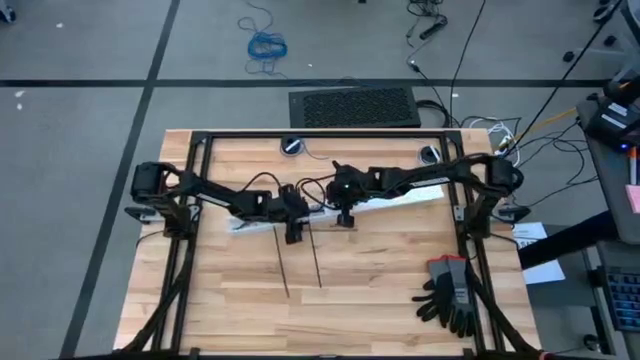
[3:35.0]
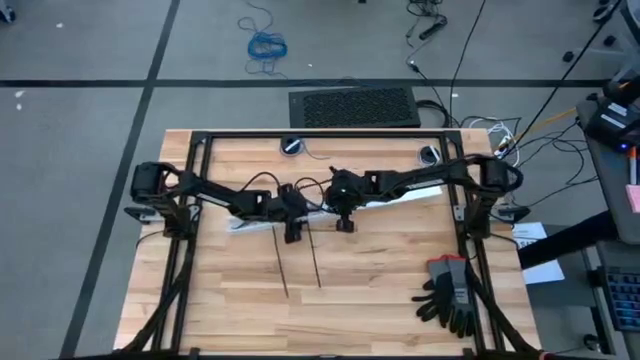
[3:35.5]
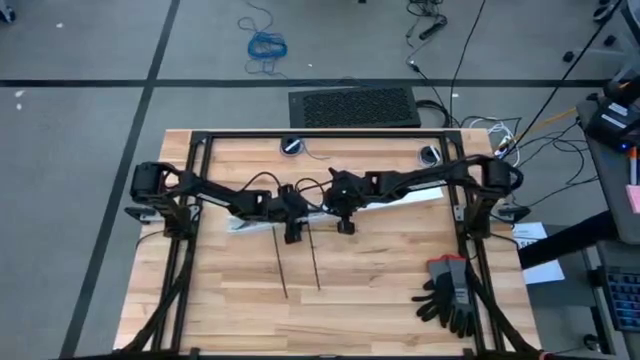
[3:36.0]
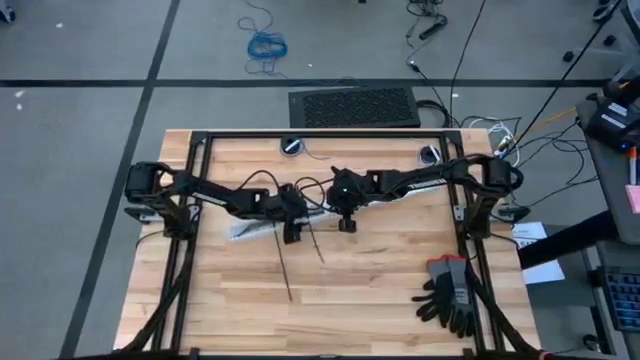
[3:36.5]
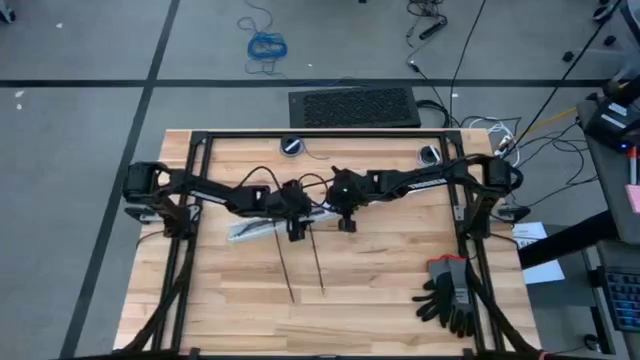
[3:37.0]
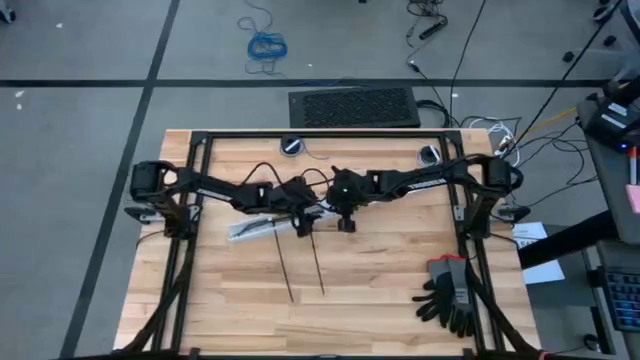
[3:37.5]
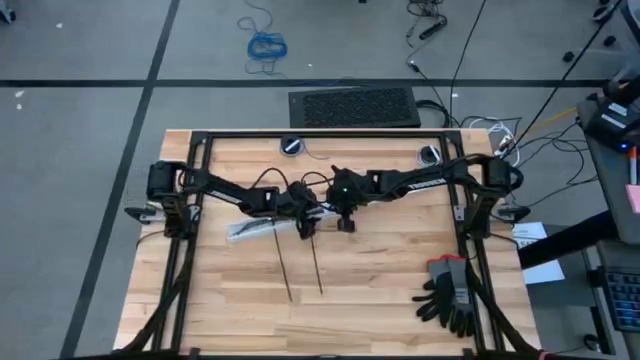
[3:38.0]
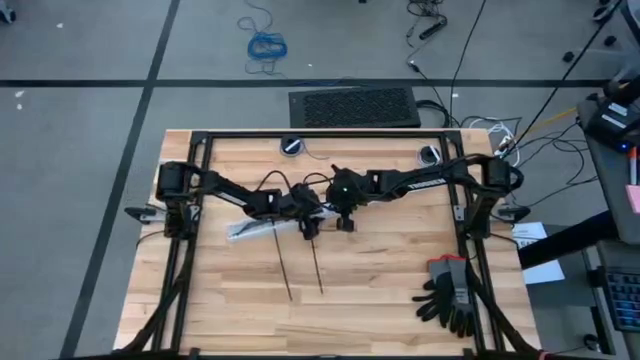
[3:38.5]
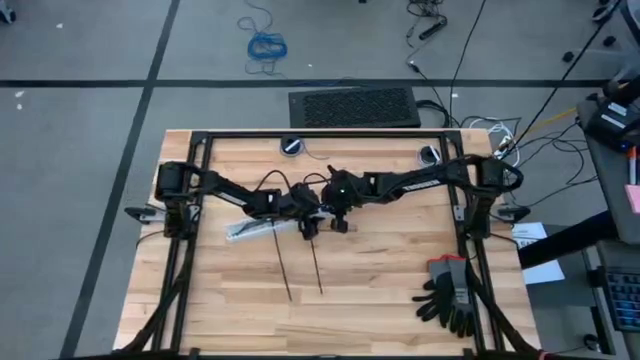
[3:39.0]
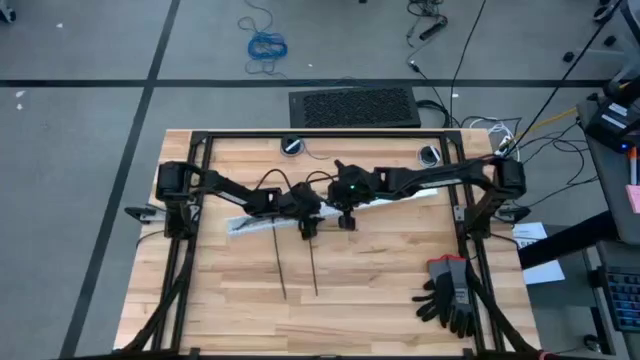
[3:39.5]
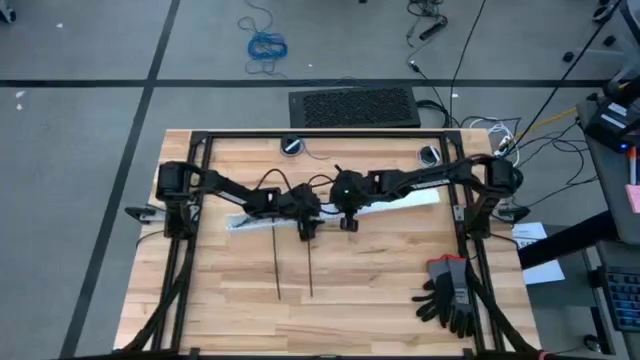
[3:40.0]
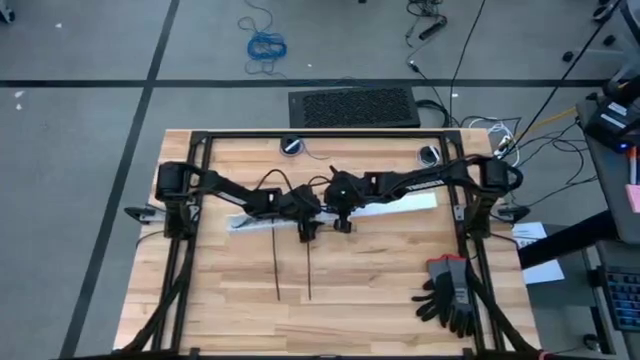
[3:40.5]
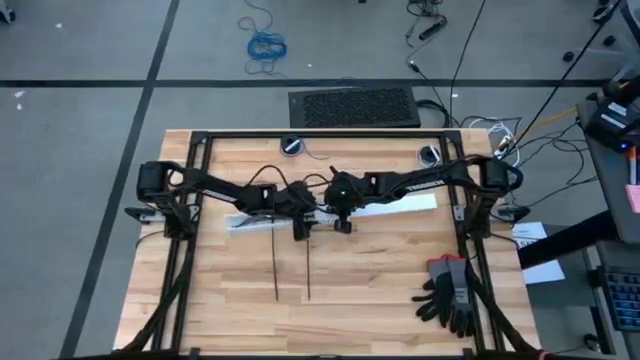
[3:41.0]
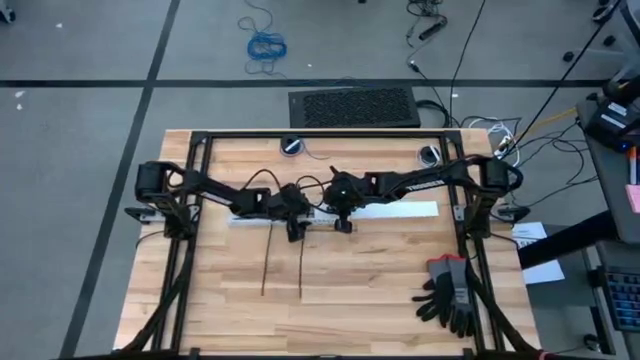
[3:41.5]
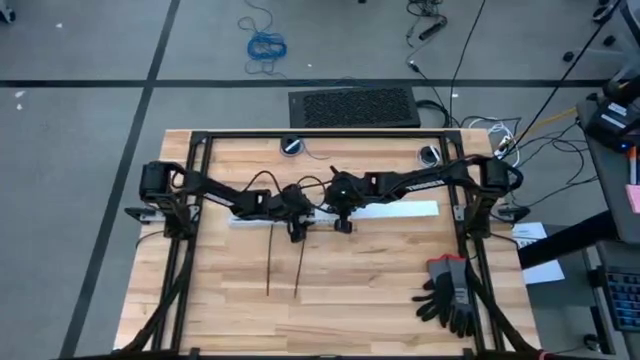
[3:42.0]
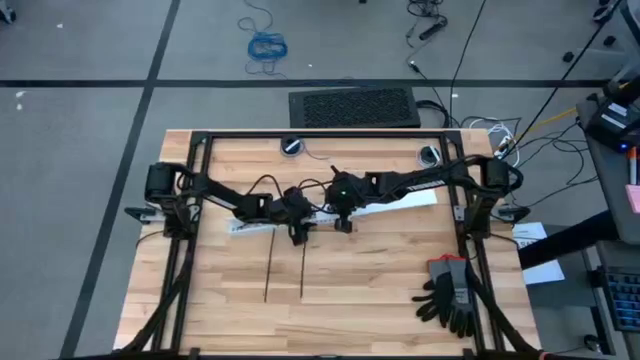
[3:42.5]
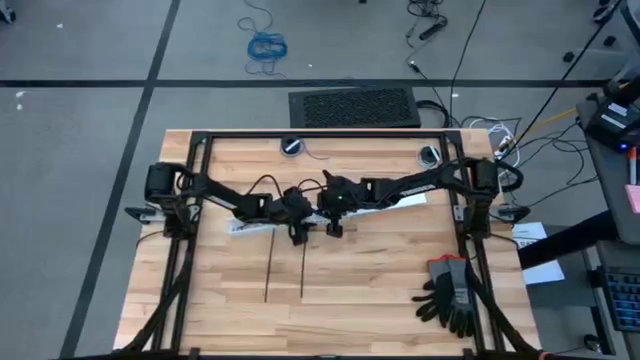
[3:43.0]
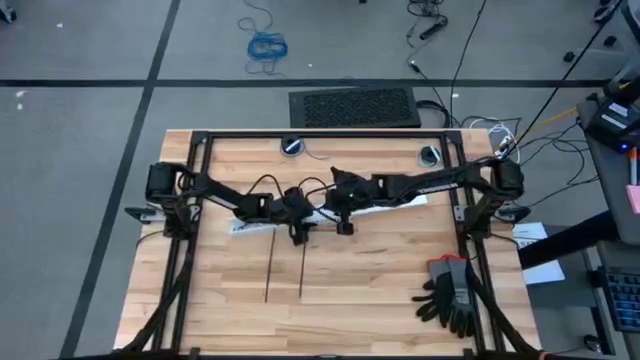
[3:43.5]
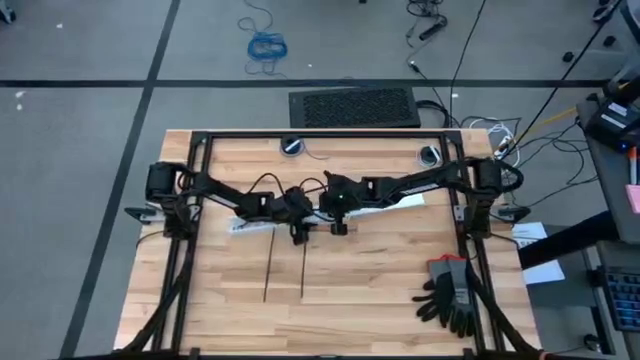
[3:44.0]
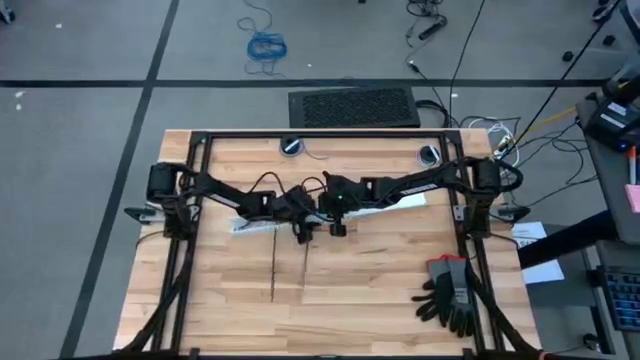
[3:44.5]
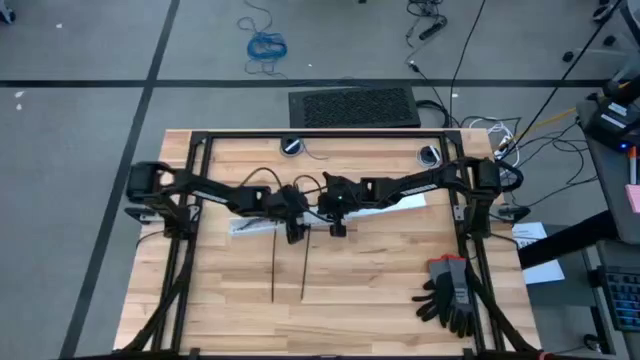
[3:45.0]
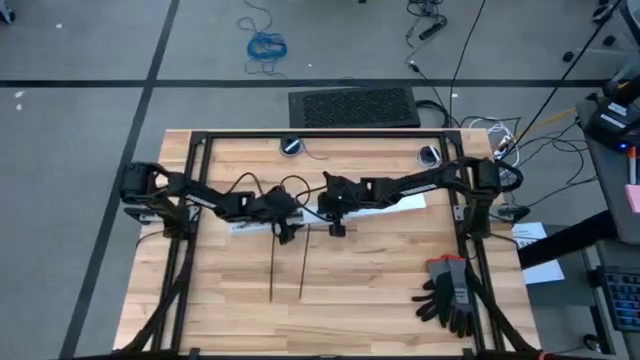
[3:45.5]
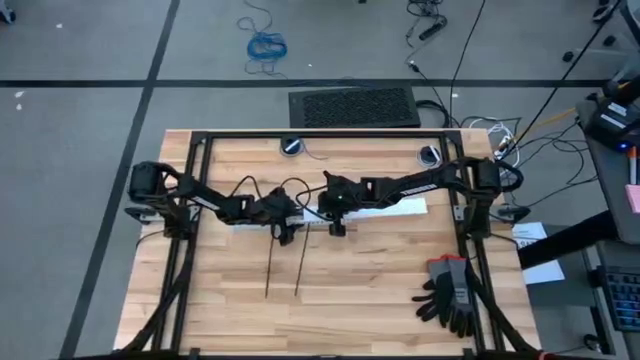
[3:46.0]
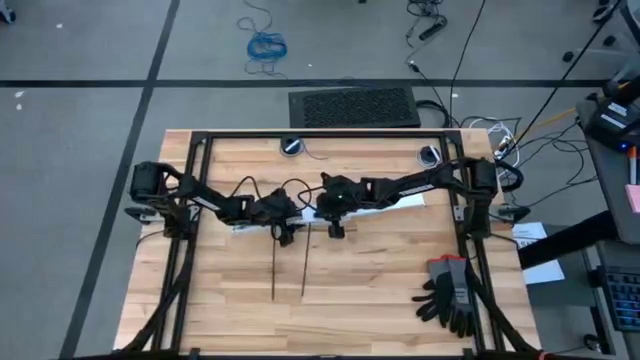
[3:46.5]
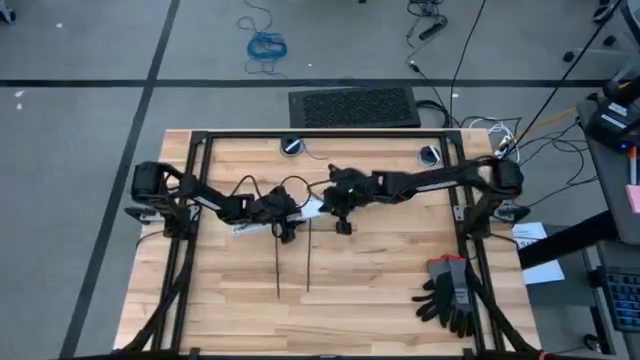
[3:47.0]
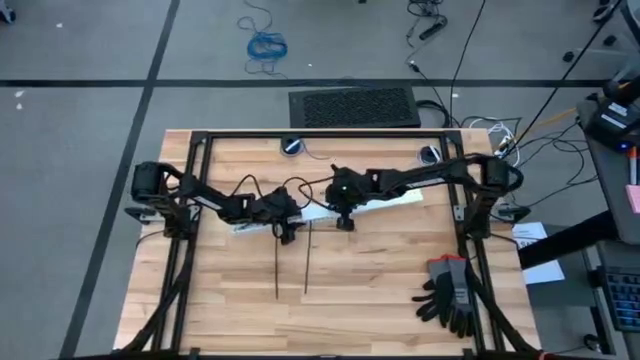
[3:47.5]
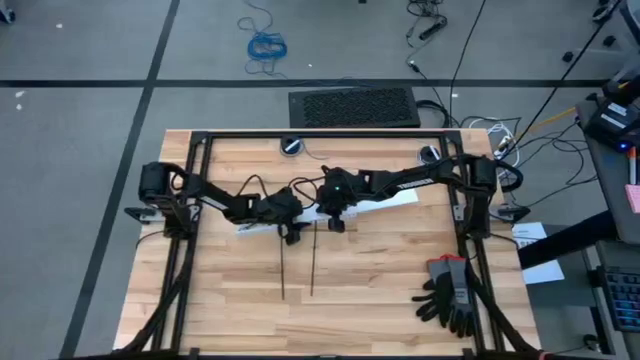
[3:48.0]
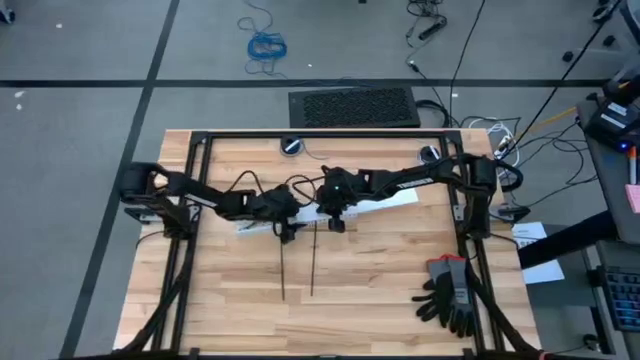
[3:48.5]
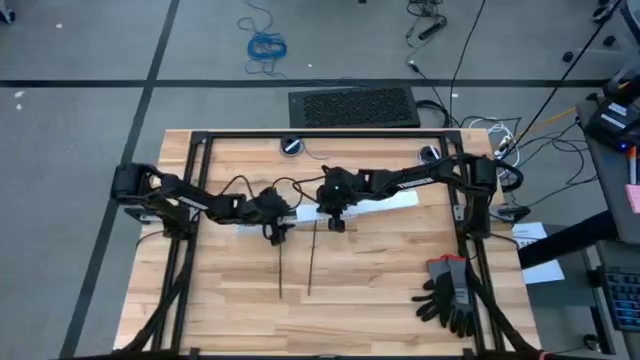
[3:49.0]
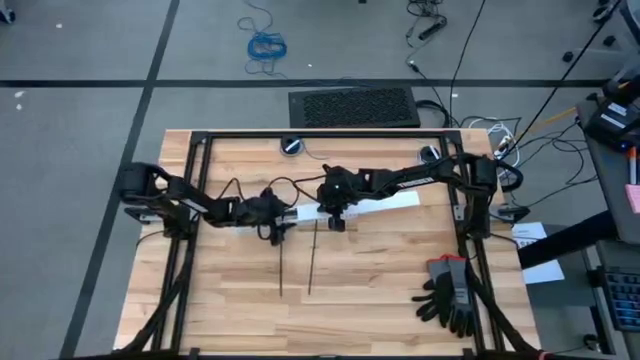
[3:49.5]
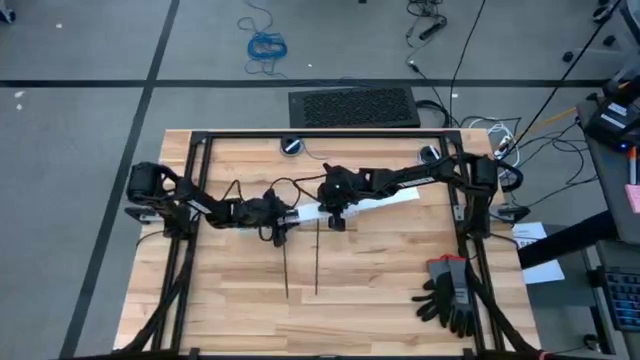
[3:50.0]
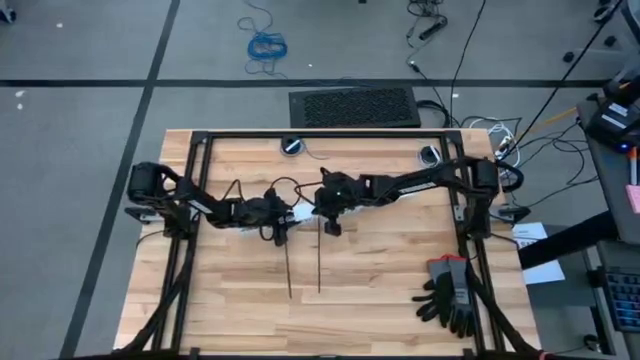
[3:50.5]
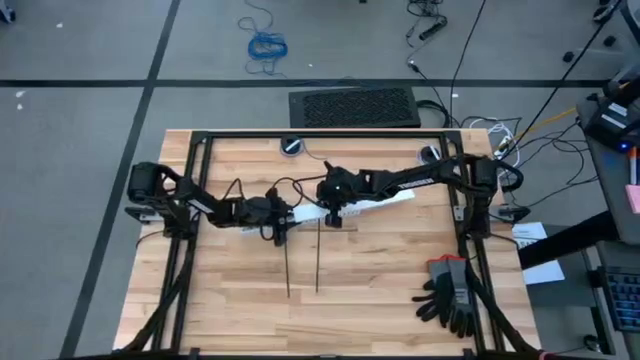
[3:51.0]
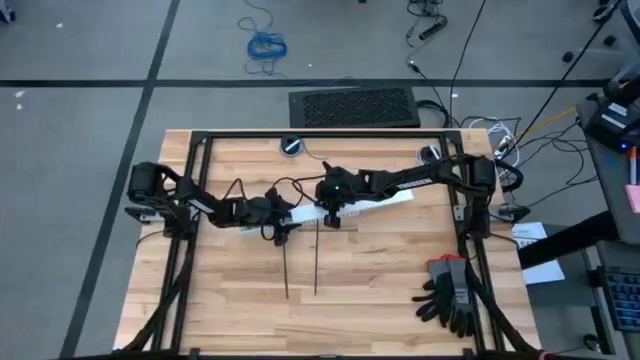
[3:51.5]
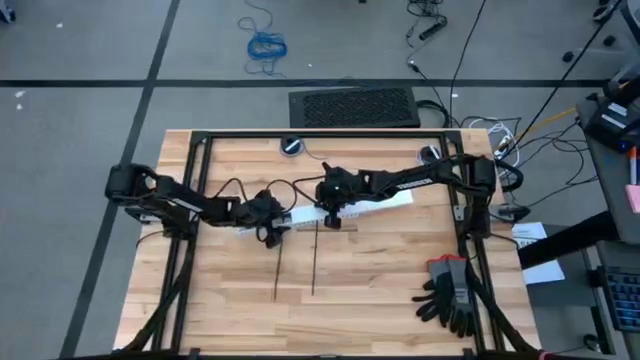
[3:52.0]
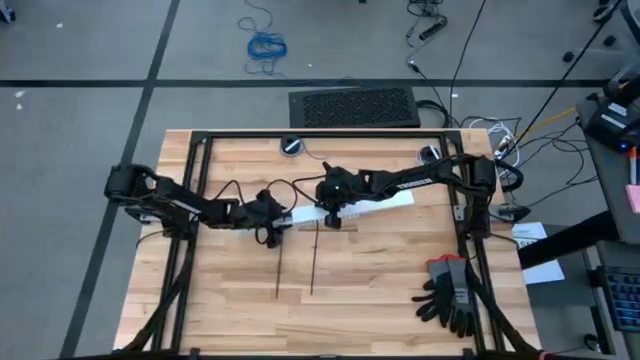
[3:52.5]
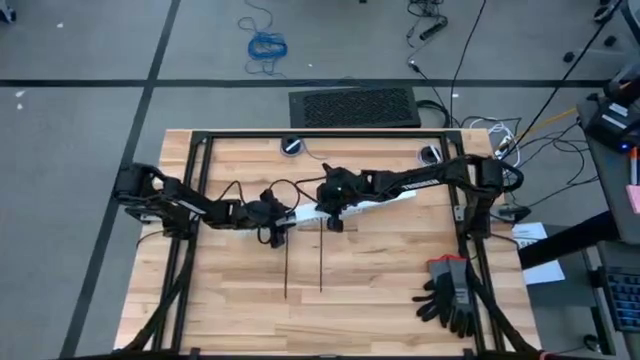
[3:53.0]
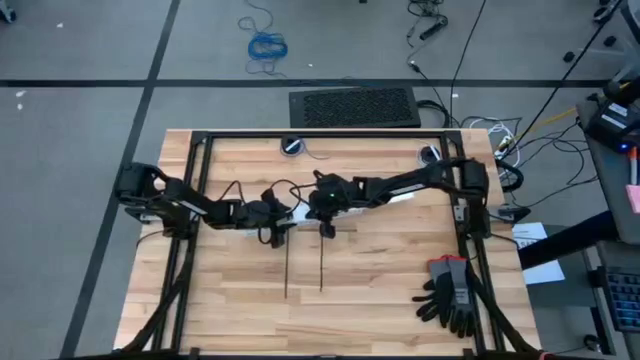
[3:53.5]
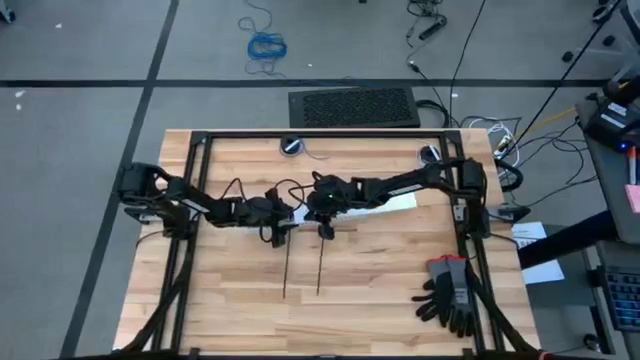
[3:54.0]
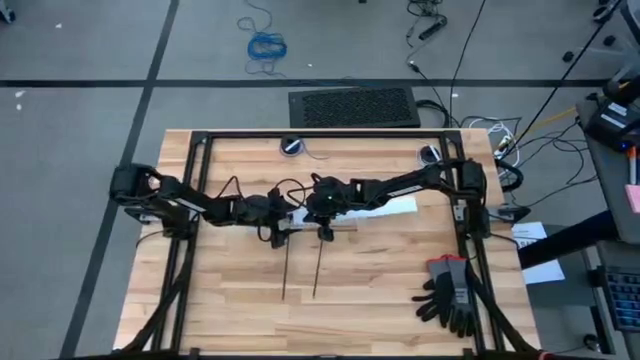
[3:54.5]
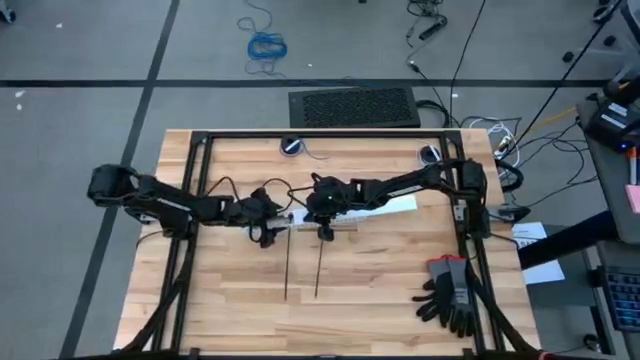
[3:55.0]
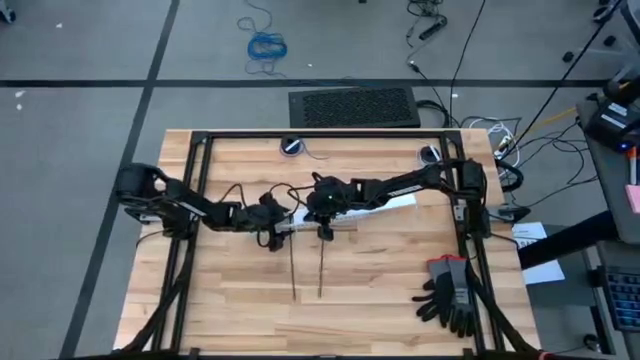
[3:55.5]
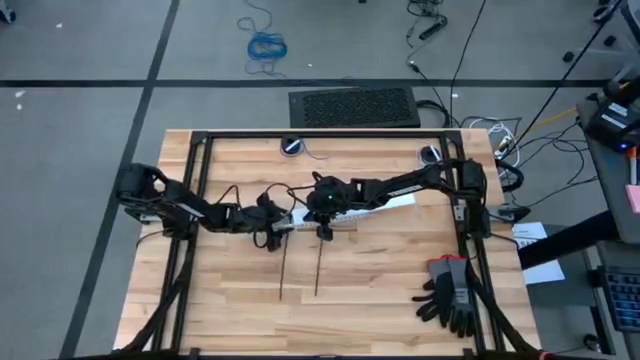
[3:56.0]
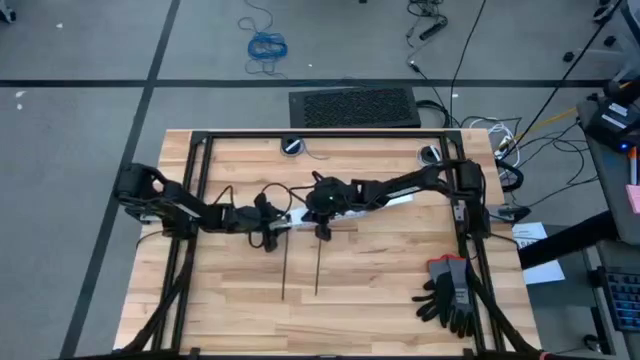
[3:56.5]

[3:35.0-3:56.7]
Task: Ziptie cables
Close the cable duct
